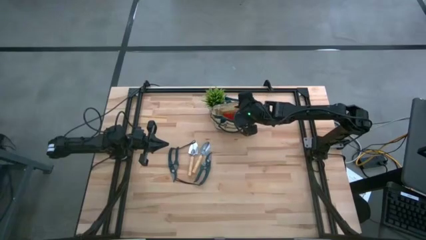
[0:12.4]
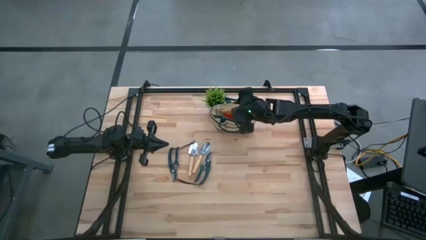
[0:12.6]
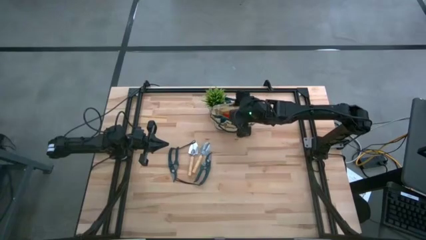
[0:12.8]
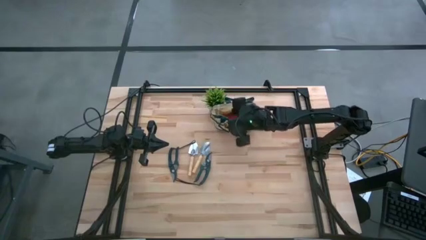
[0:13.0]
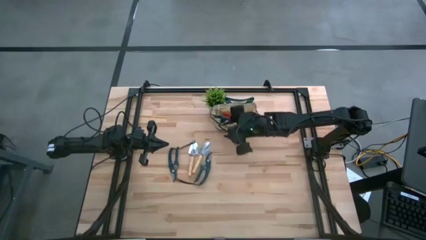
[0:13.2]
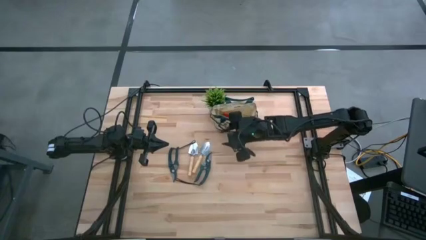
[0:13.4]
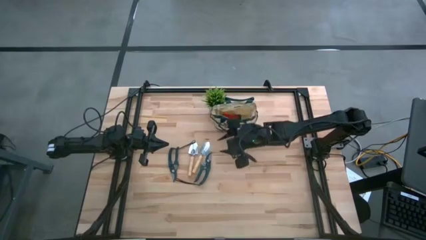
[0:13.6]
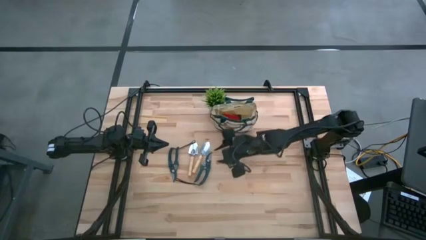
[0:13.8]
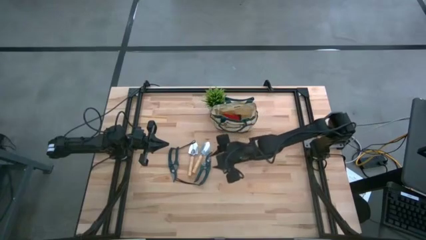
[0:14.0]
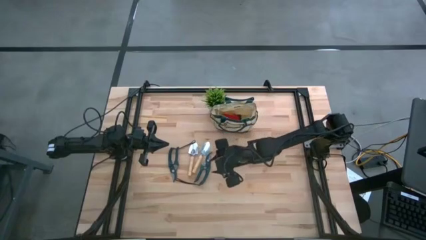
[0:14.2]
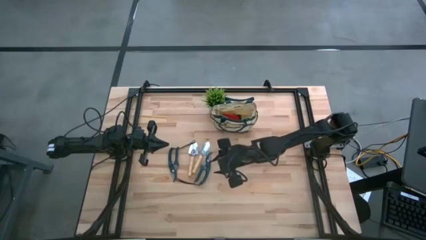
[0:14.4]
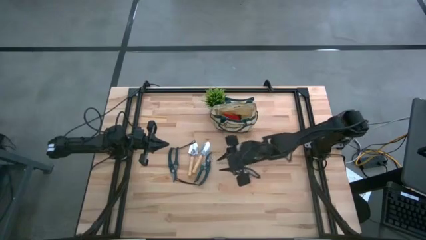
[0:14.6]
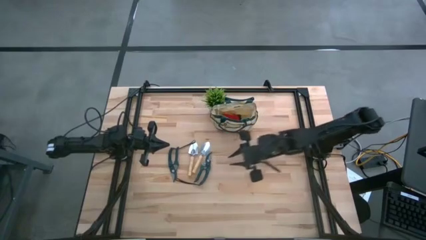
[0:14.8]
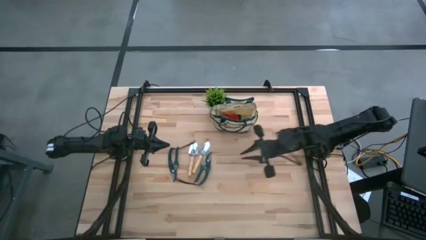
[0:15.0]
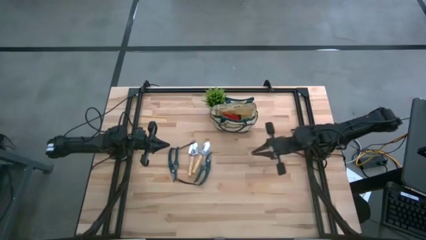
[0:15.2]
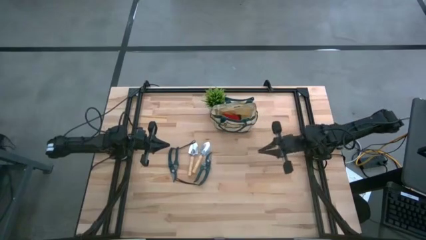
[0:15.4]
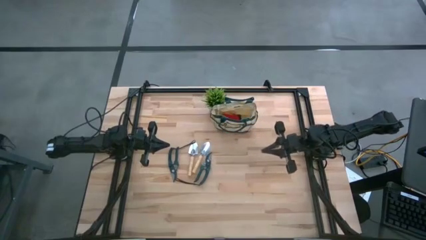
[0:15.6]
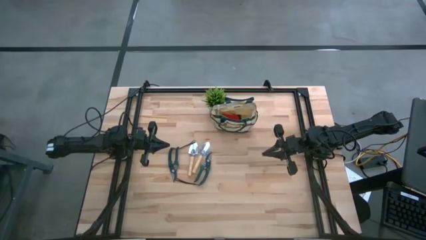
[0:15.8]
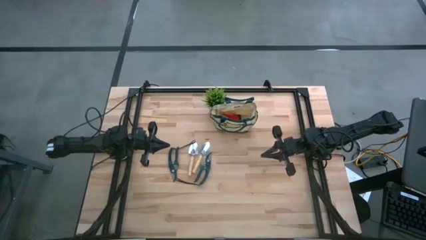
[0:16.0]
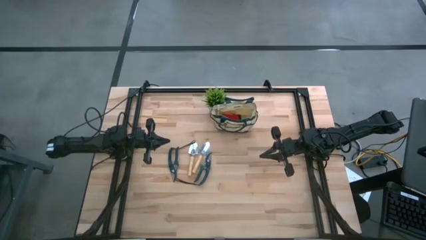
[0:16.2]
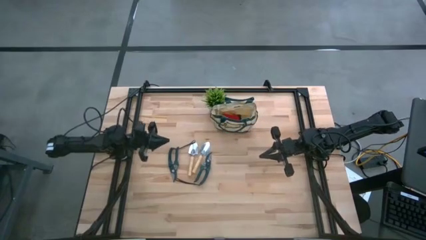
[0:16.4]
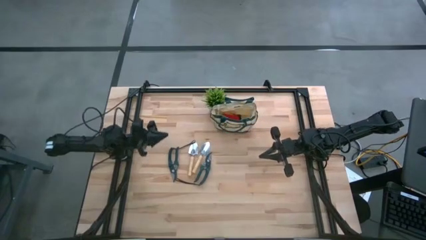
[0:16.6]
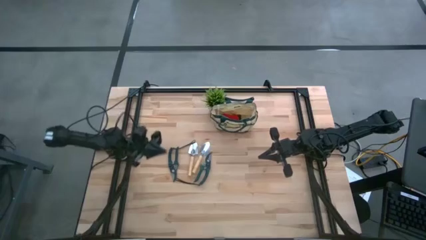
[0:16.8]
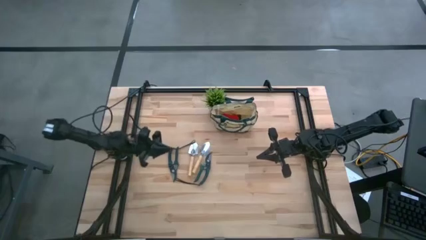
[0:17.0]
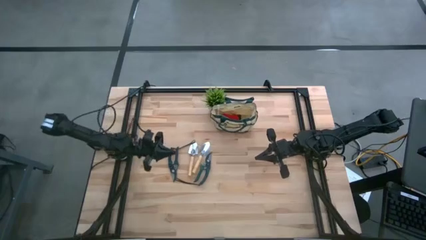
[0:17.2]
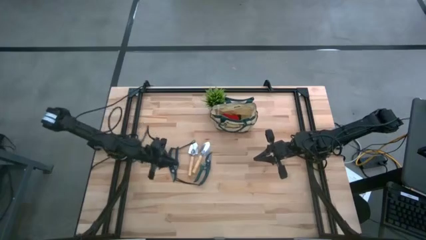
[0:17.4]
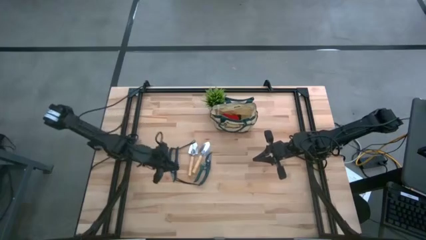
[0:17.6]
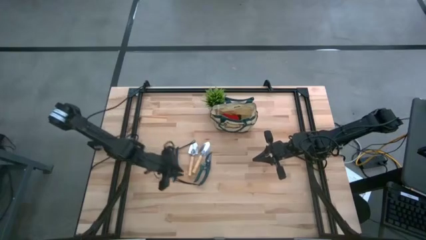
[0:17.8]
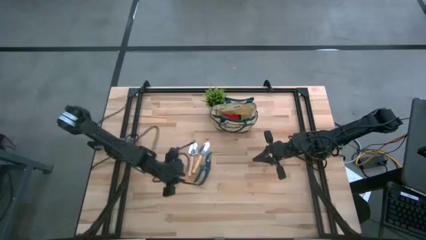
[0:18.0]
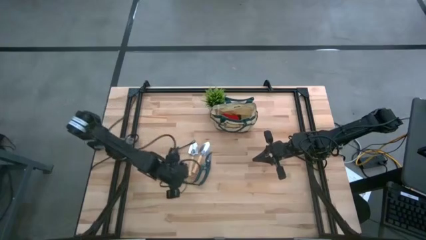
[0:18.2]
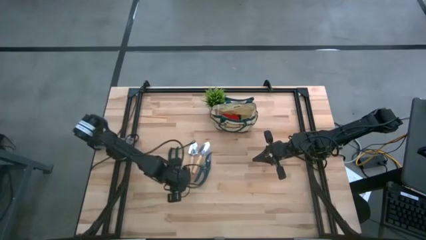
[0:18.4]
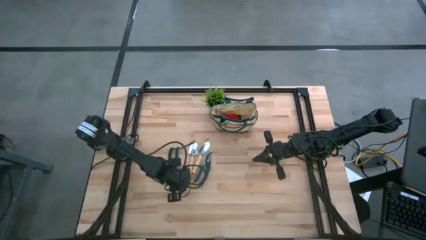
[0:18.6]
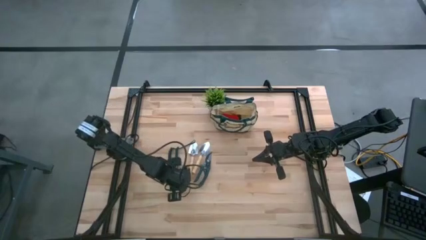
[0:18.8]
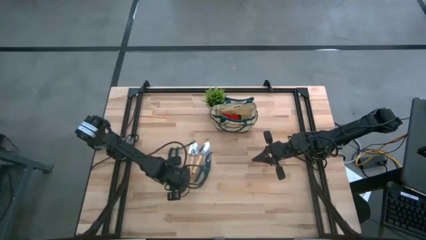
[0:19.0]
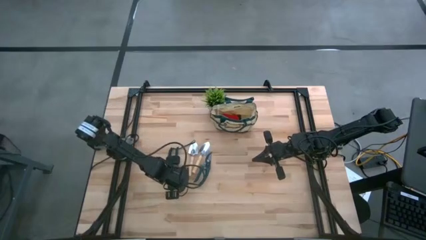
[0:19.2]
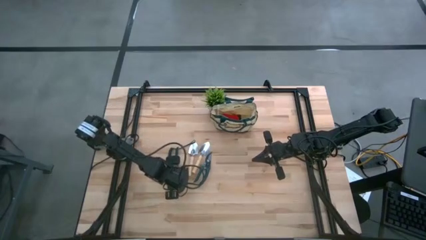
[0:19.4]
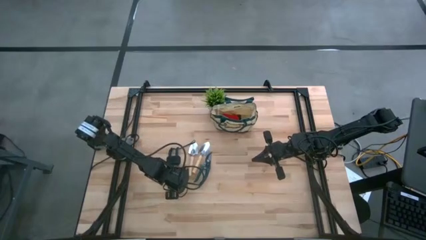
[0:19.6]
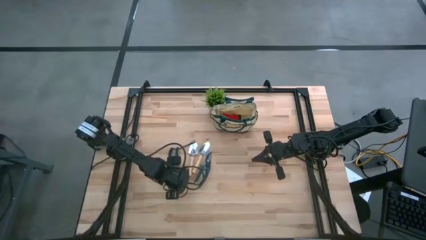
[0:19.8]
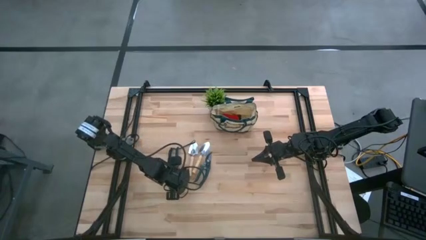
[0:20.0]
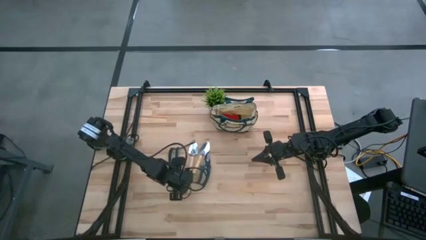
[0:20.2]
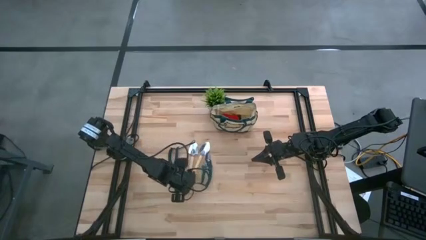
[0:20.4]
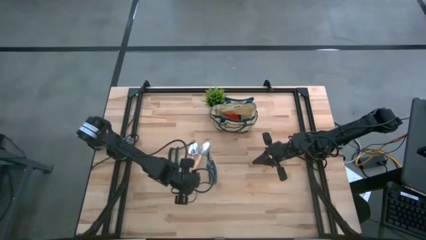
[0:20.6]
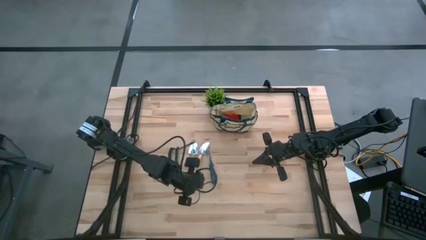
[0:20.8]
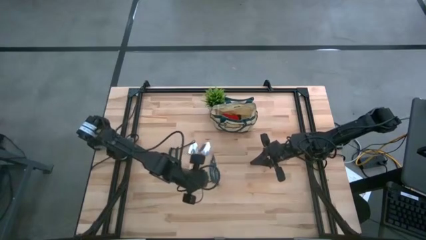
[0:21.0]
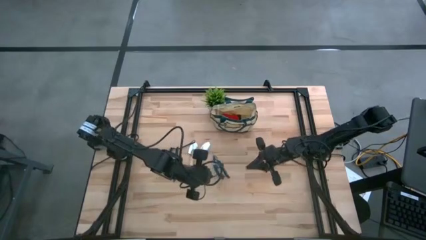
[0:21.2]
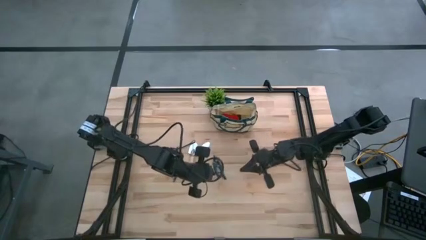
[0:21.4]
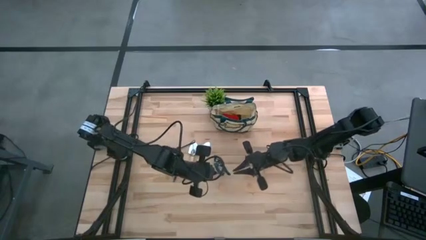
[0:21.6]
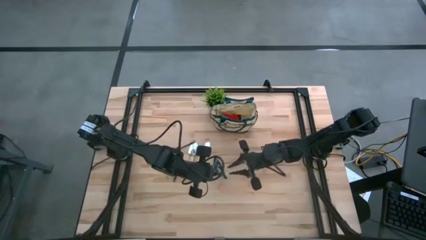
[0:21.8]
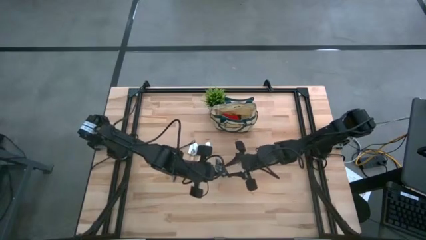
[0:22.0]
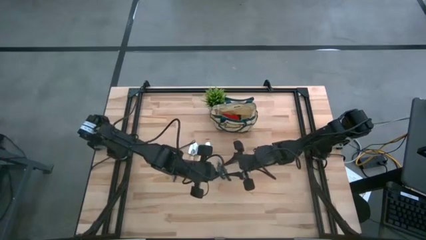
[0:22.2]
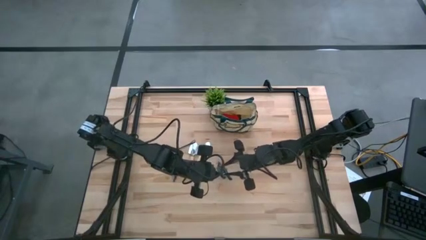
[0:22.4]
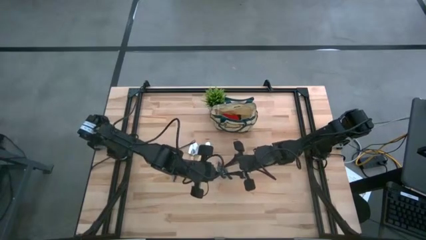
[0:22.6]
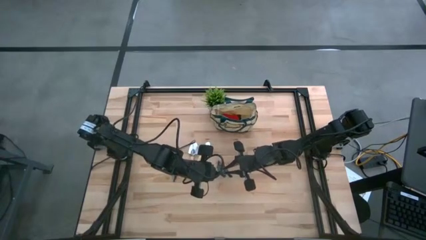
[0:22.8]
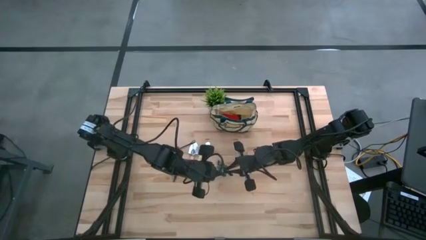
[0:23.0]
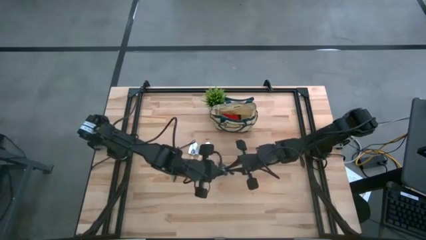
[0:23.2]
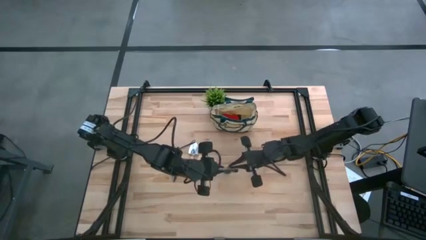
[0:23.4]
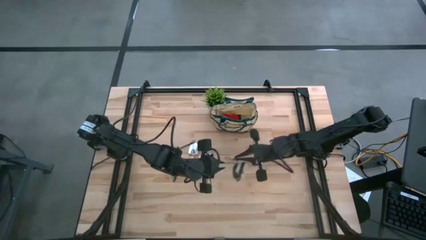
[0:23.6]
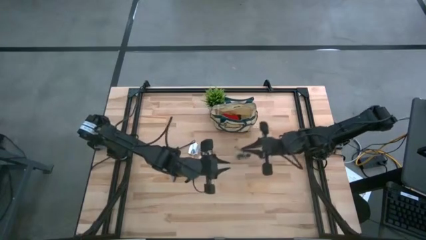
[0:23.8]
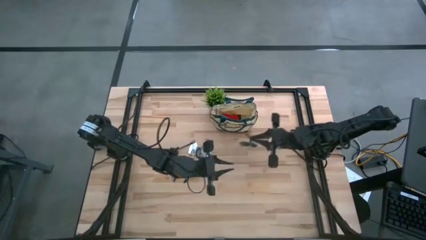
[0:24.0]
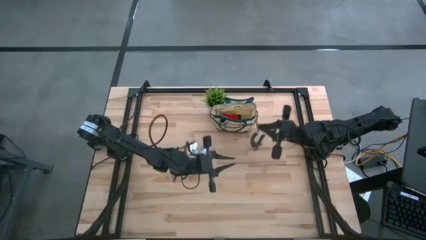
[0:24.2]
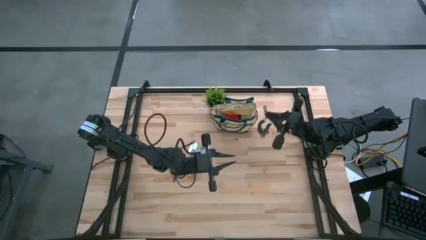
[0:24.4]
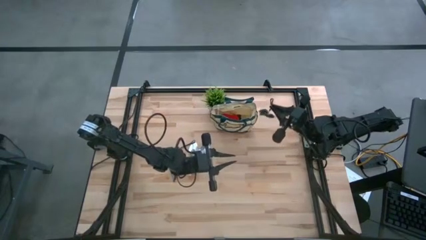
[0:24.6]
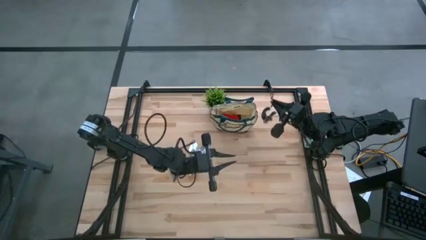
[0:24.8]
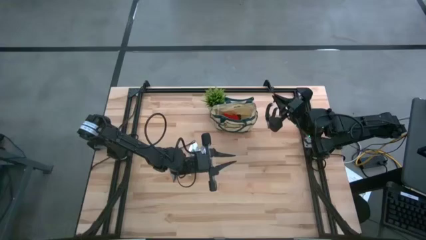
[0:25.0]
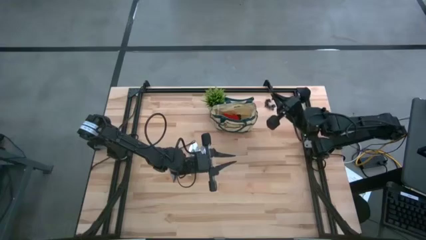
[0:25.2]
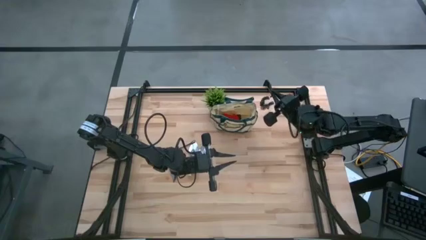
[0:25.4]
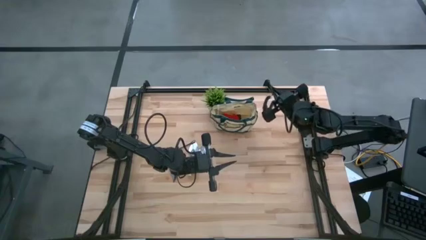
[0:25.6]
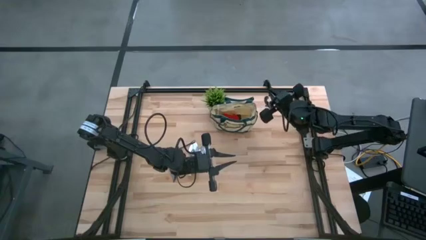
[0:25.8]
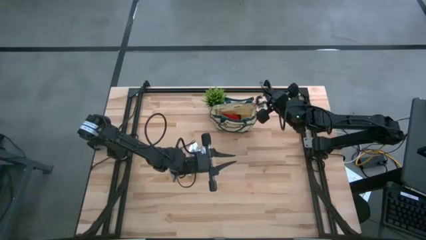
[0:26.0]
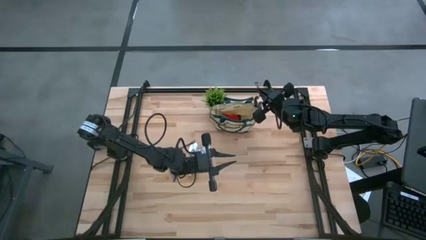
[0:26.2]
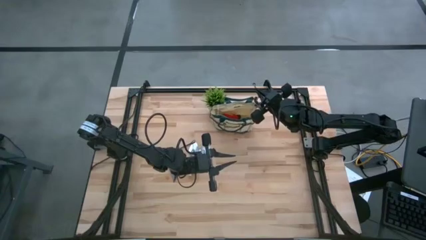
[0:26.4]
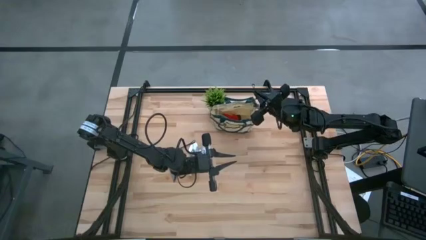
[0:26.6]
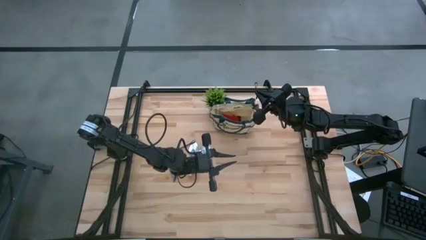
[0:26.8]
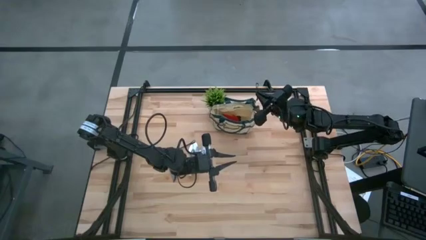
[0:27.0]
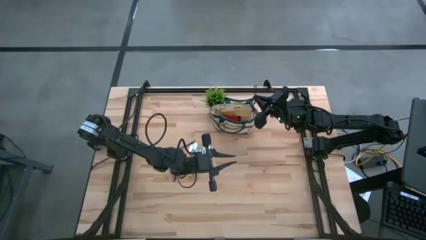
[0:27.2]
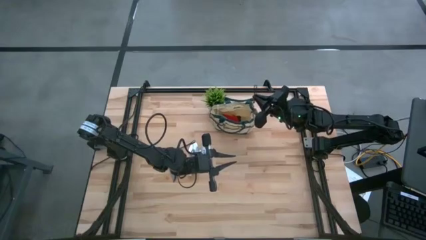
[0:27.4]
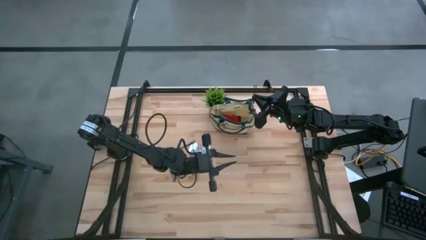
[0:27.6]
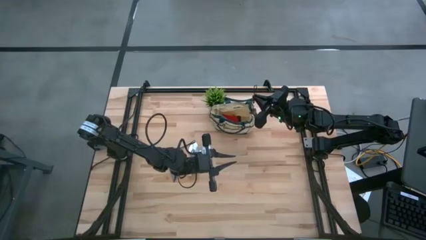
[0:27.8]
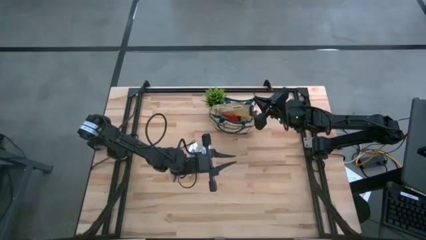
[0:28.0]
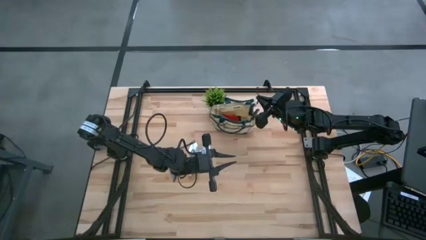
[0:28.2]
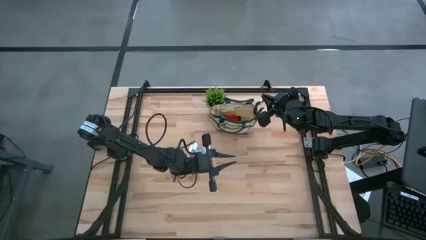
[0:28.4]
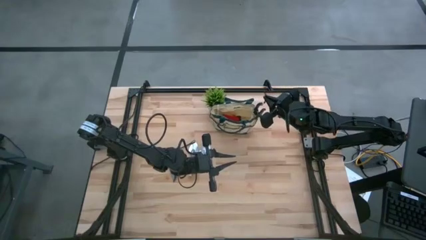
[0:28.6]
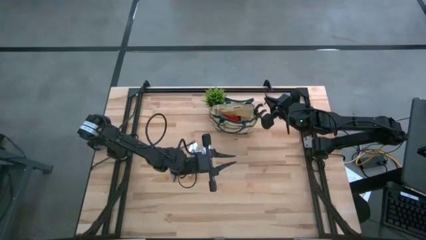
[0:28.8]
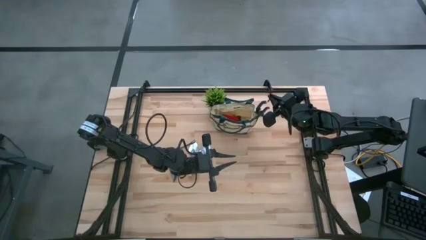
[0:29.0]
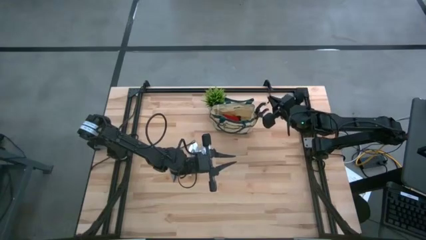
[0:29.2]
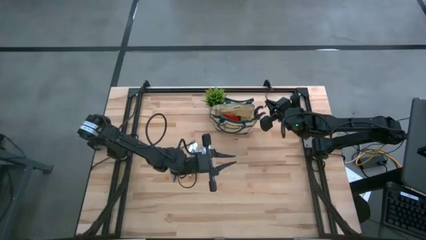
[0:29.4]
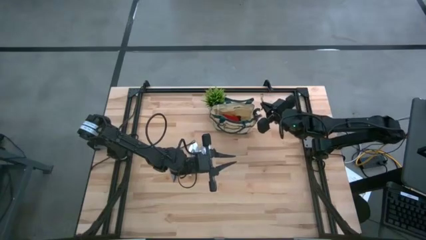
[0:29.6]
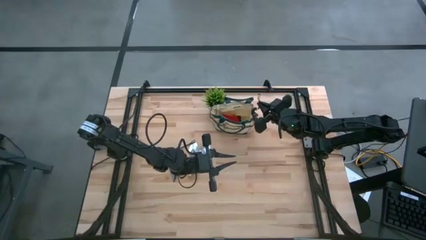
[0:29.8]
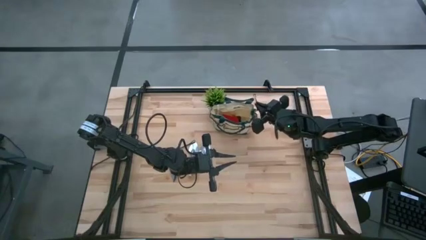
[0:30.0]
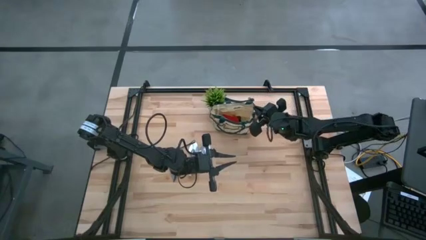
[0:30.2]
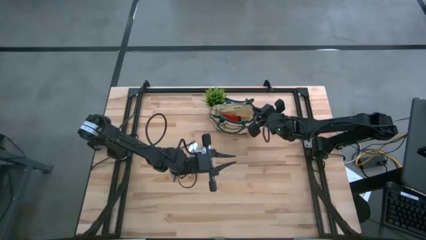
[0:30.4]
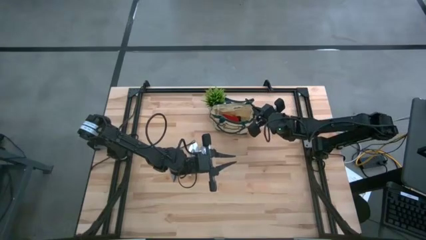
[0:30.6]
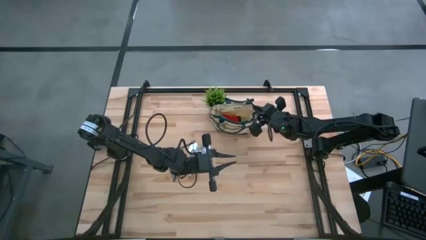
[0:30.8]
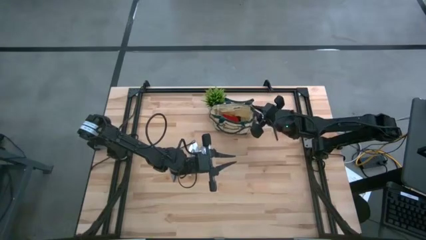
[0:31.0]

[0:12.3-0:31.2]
Task: Pick & Place Garden tools in Gardening bag
Put the right green shear scissors into the gardening bag
